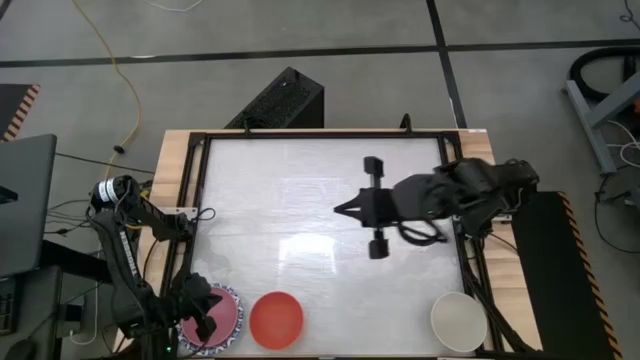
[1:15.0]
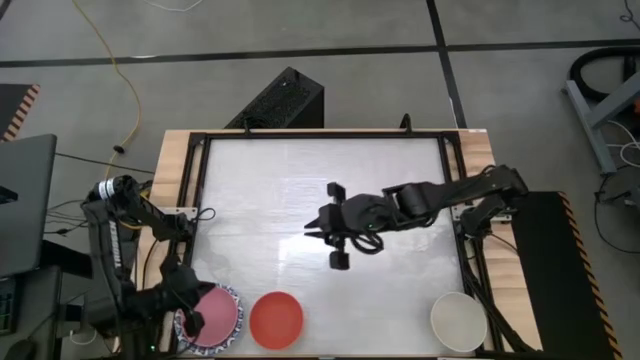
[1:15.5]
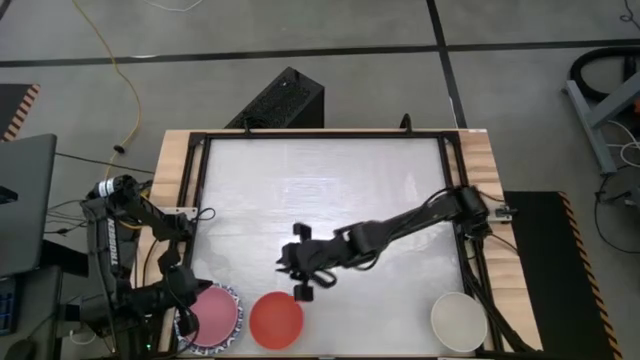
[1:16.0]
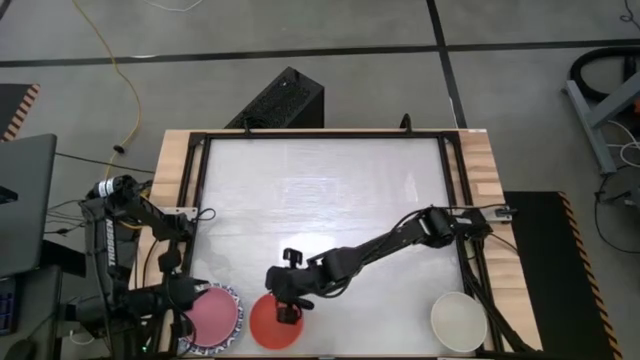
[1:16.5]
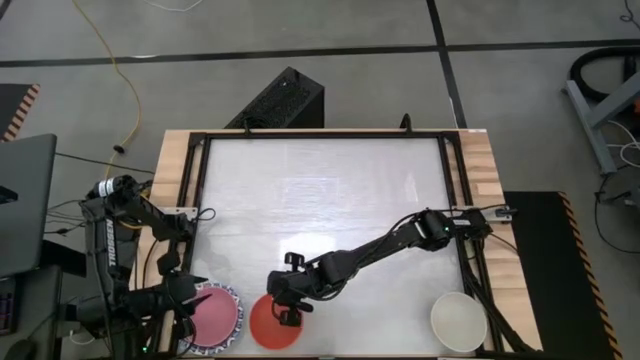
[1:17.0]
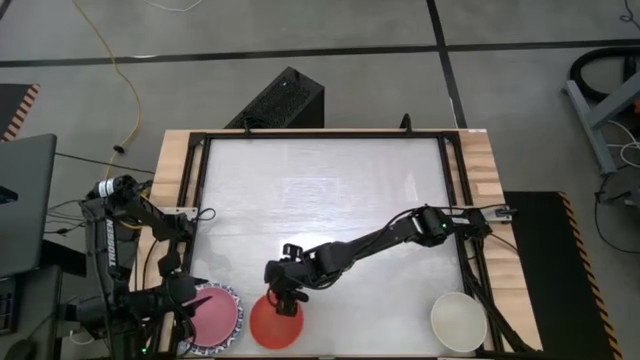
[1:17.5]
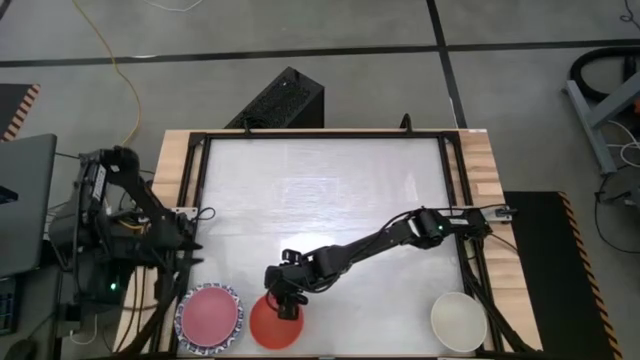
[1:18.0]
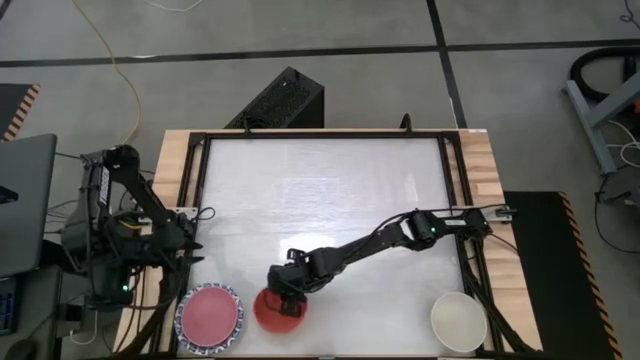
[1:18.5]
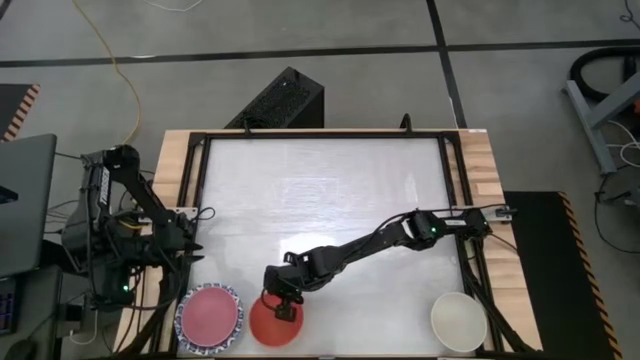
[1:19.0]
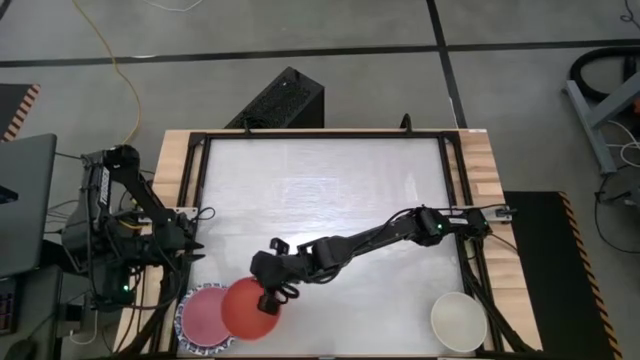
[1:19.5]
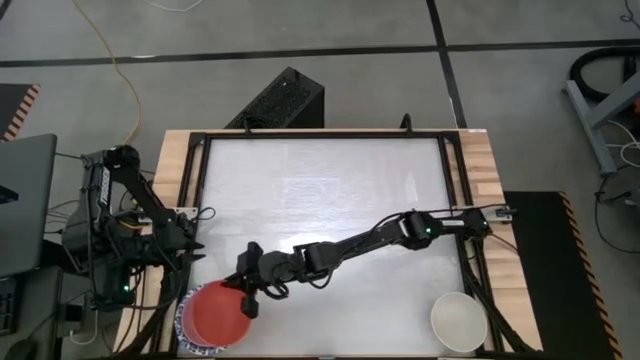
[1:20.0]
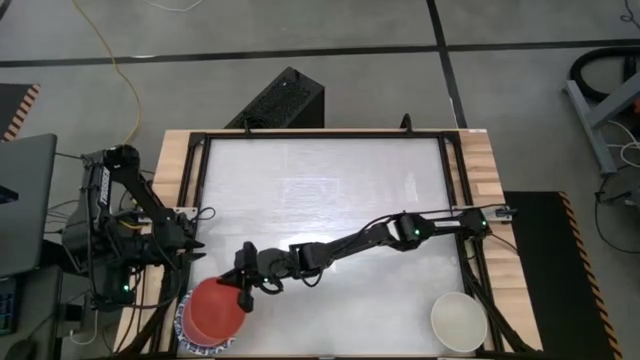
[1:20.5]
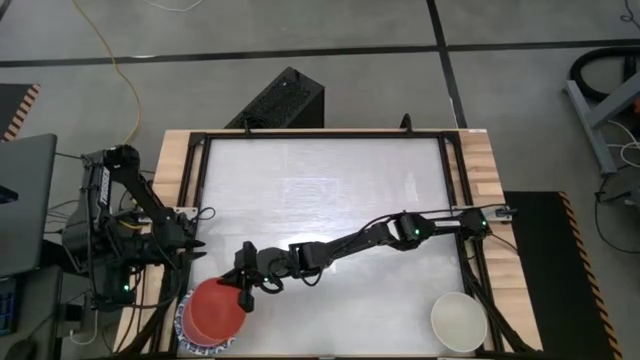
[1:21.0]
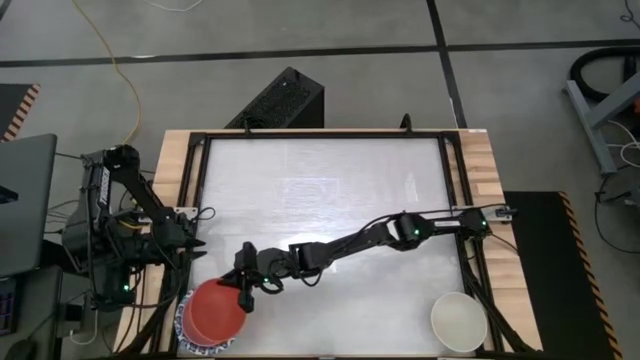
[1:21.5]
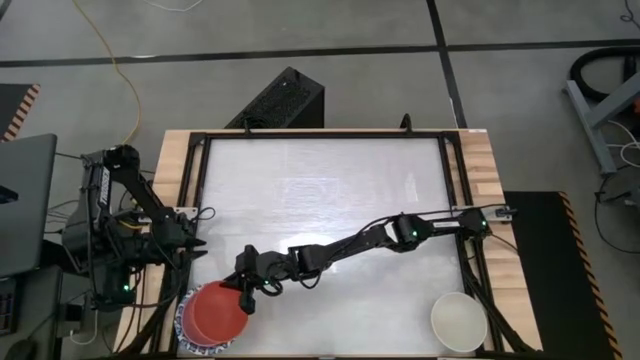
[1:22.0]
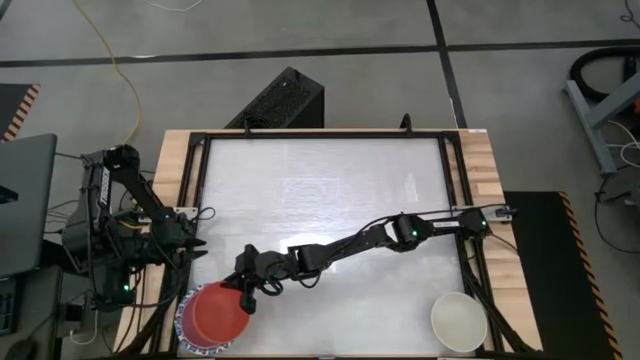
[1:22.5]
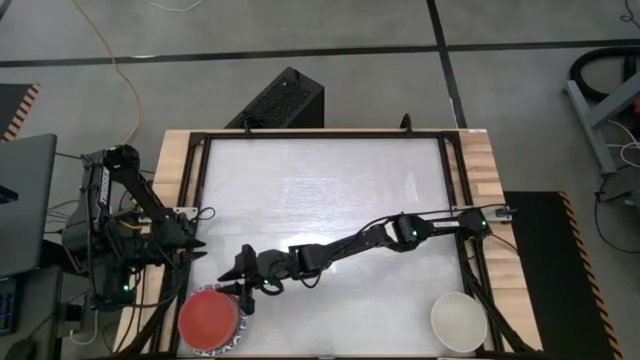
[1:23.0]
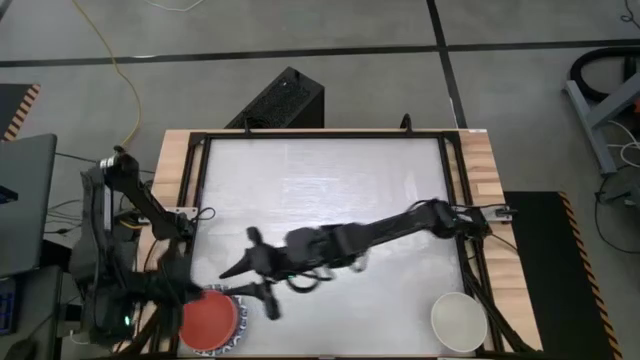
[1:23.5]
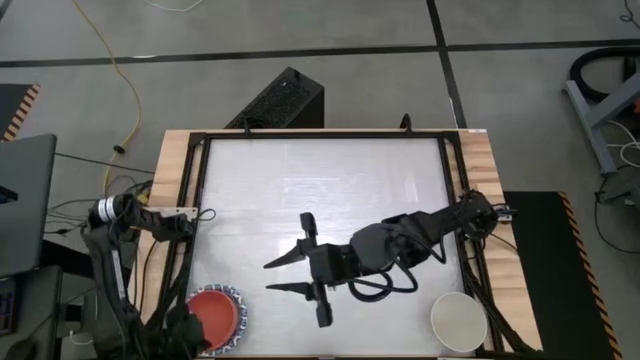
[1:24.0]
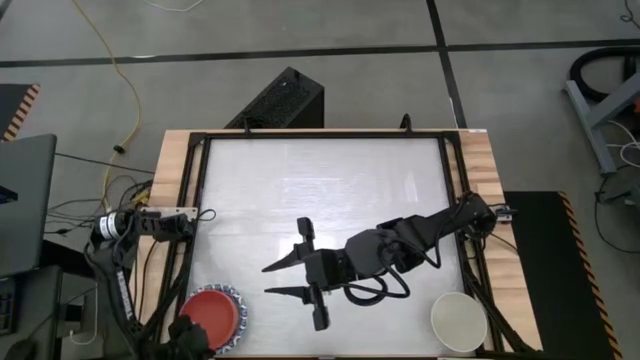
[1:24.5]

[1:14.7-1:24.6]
Task: Nest bowls inside each other by size order
Stack the orange bowl onto the pink bowl

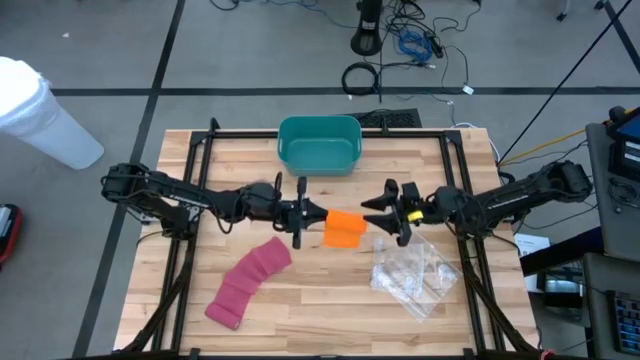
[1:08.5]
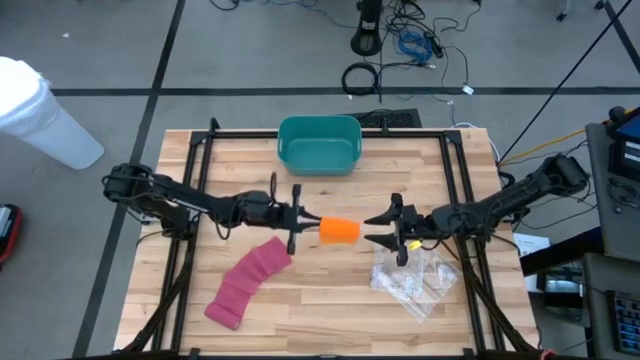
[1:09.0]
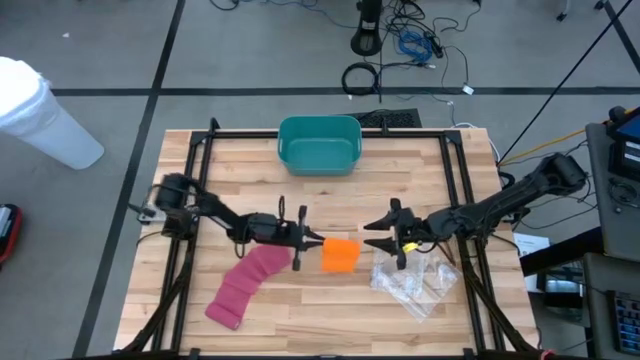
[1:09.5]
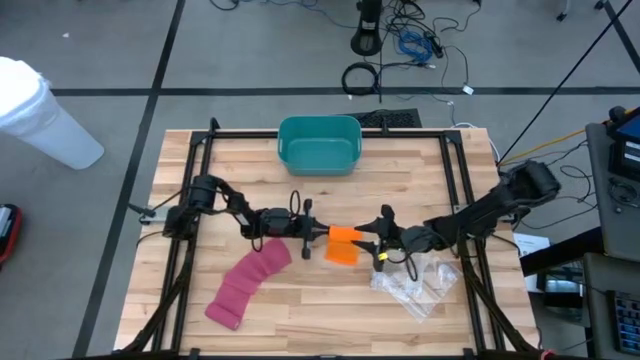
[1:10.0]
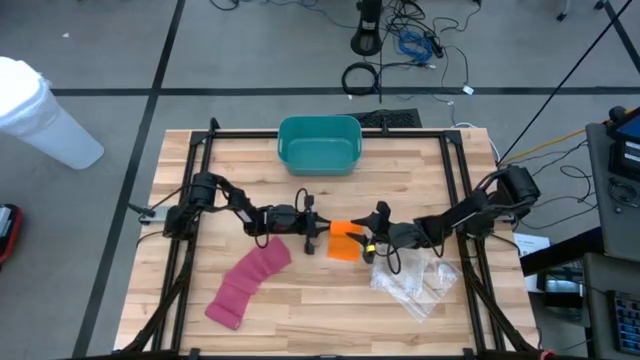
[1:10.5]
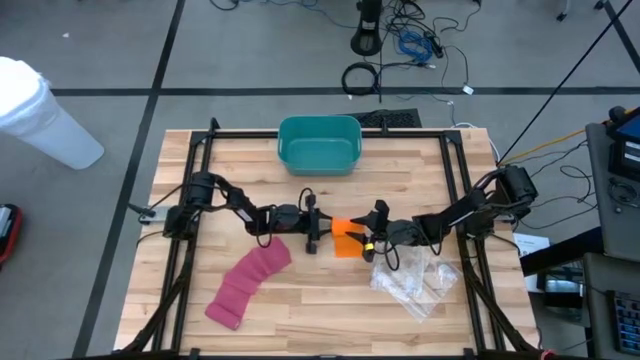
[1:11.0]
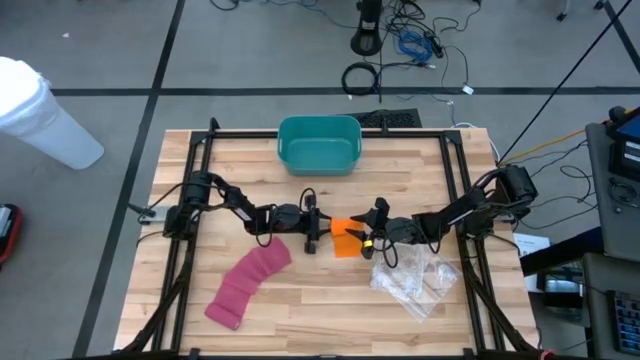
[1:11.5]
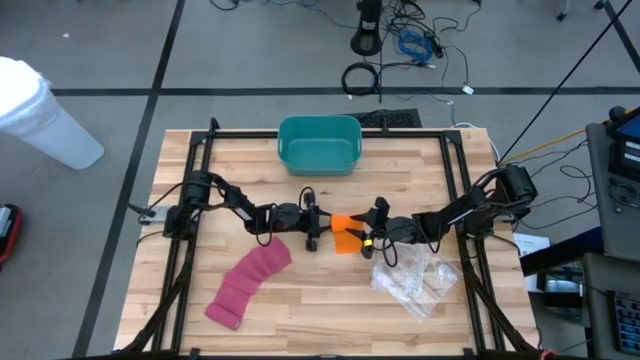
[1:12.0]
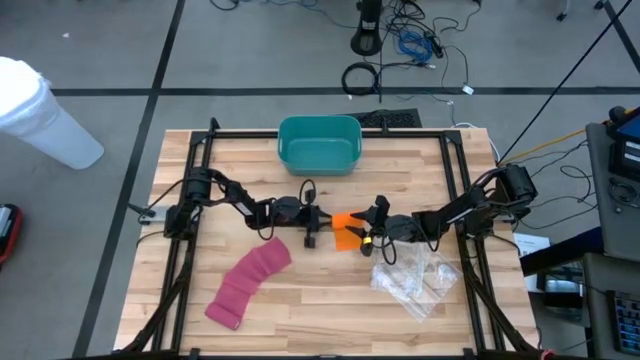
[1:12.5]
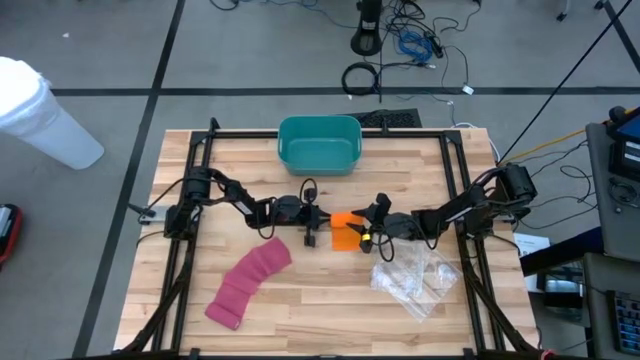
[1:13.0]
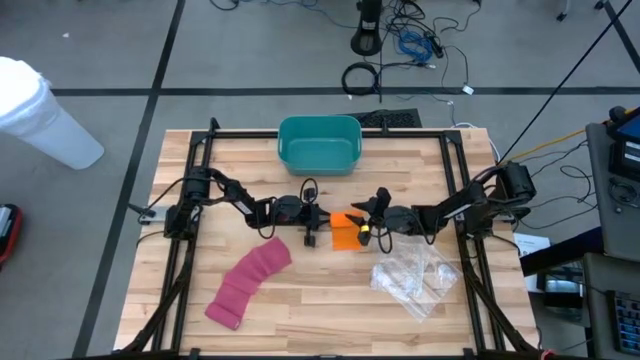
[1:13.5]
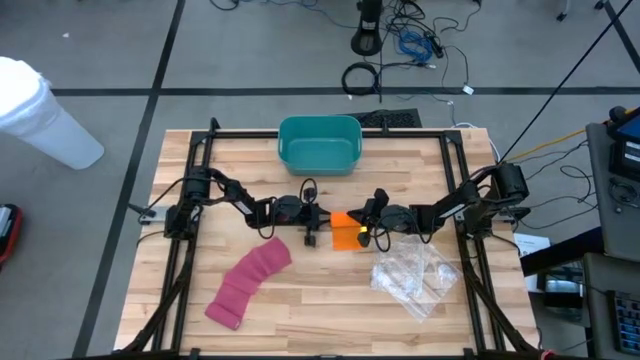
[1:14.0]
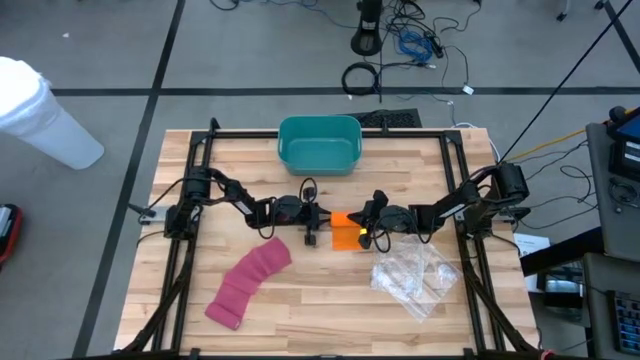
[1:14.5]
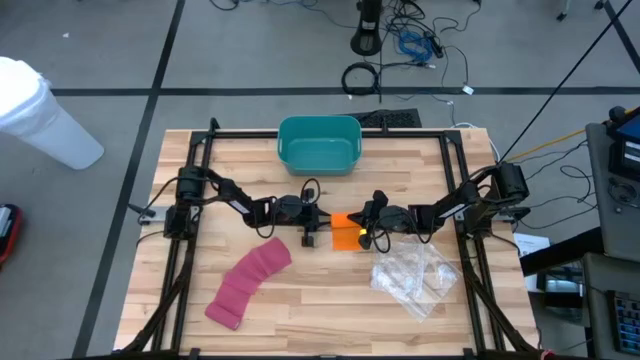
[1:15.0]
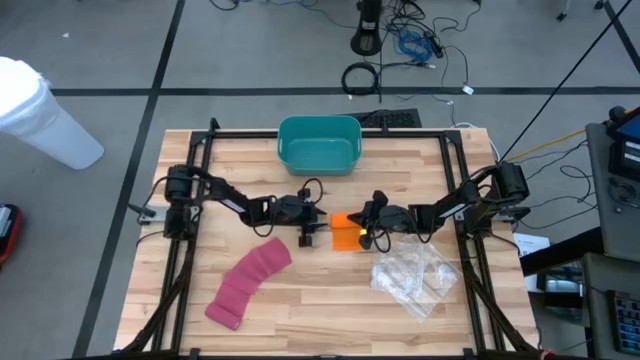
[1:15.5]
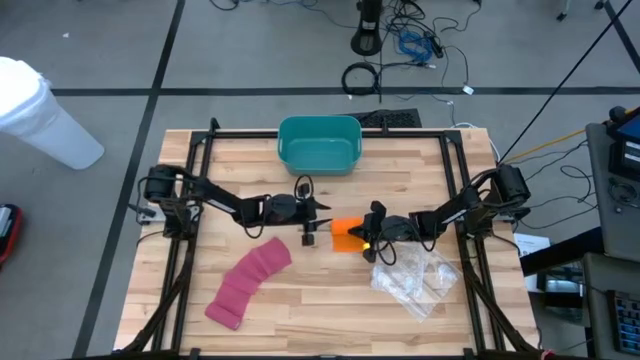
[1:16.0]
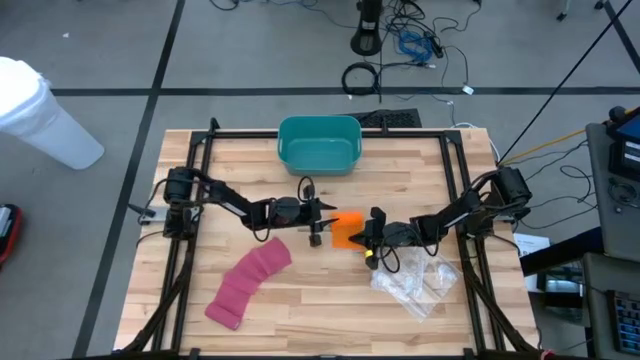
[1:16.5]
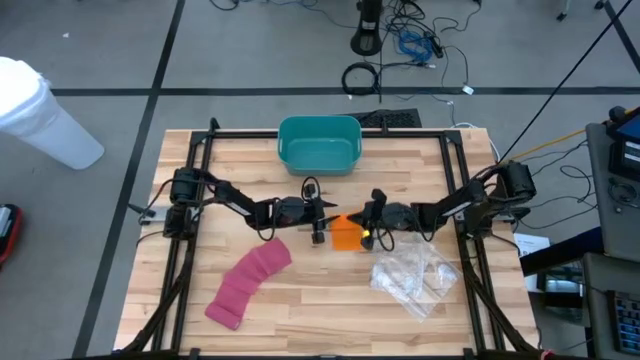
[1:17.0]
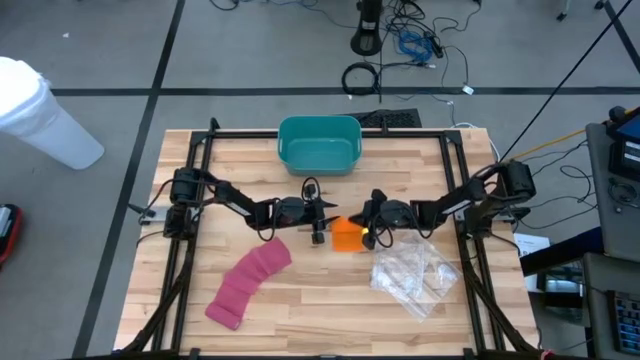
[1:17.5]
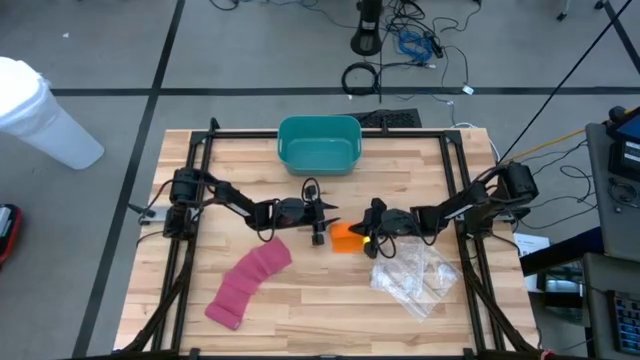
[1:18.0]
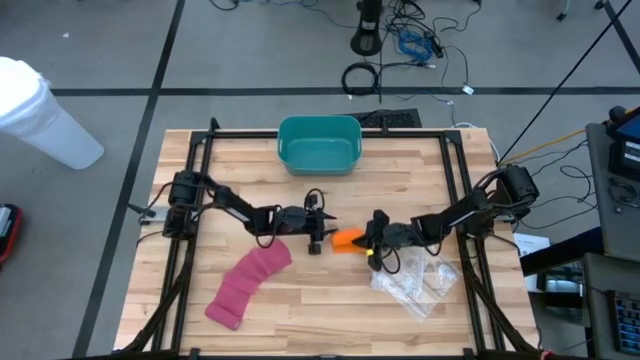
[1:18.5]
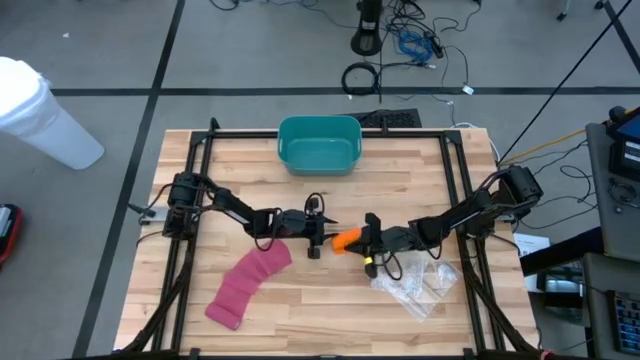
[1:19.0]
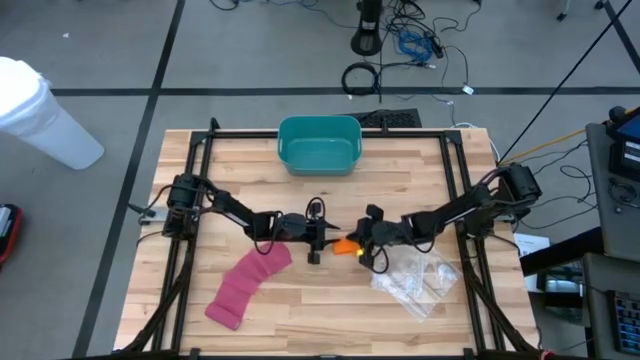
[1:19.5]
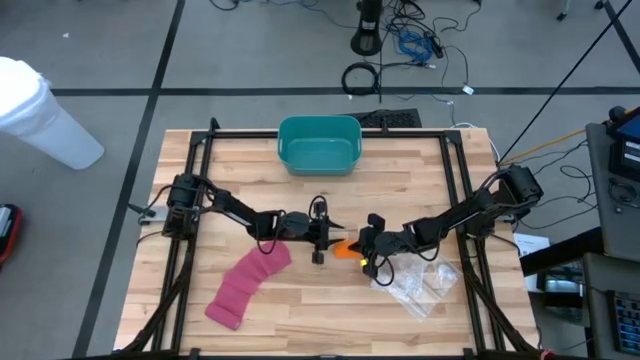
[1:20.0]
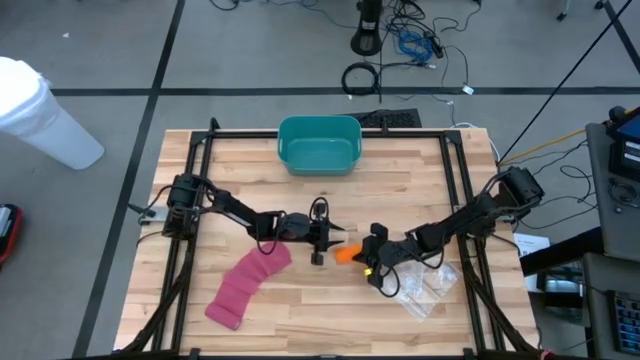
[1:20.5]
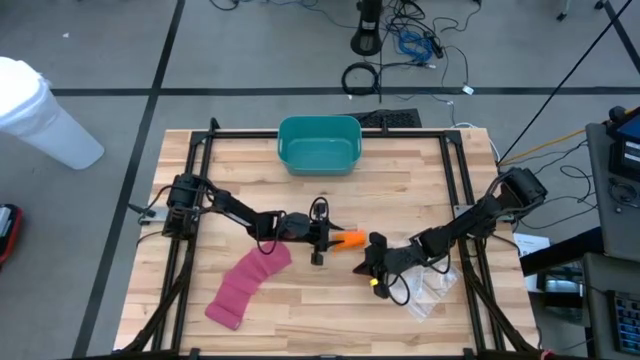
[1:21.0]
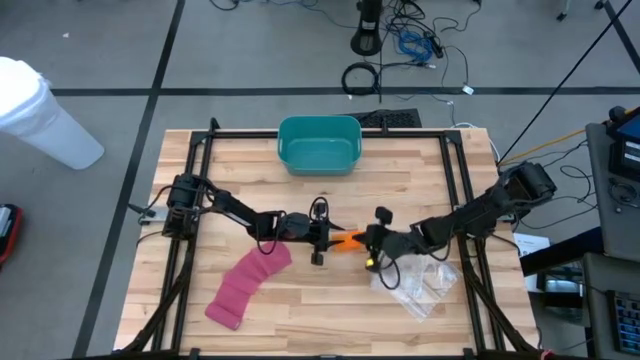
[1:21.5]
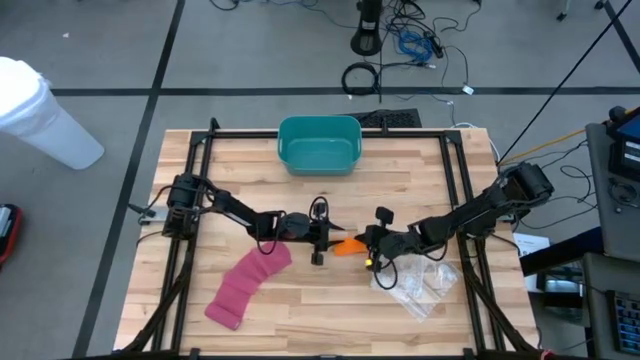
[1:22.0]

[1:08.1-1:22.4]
Task: Roll bandage
Roll the orange bandage
